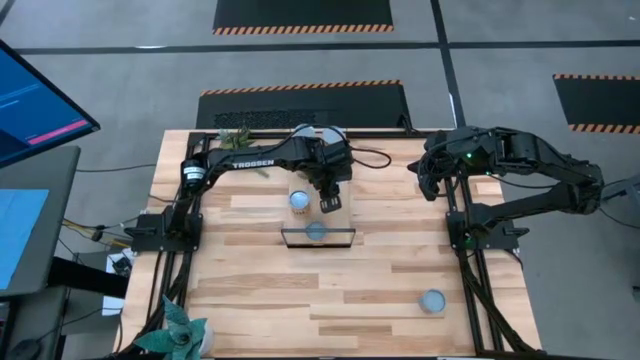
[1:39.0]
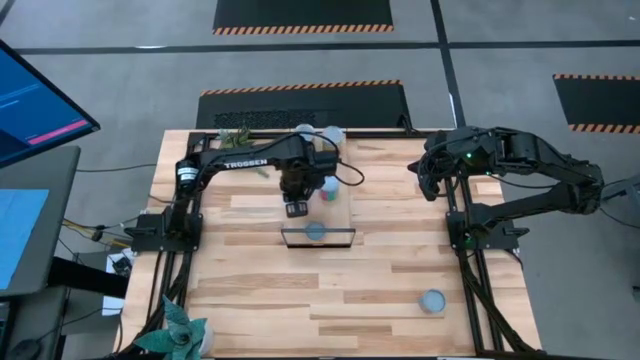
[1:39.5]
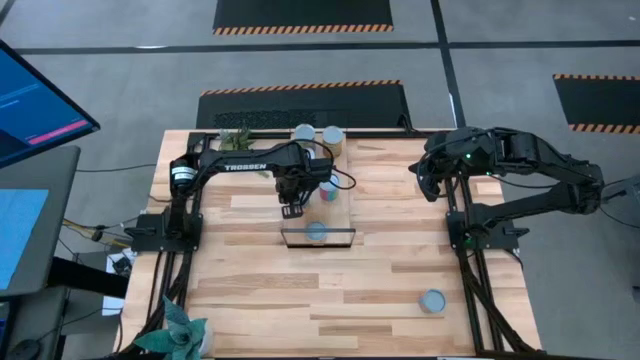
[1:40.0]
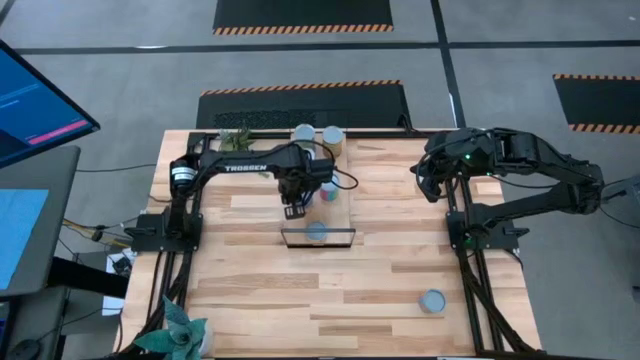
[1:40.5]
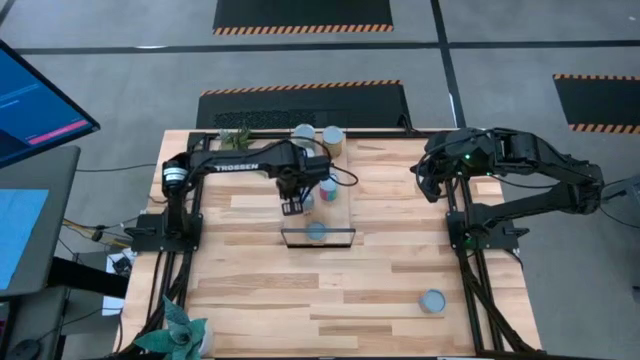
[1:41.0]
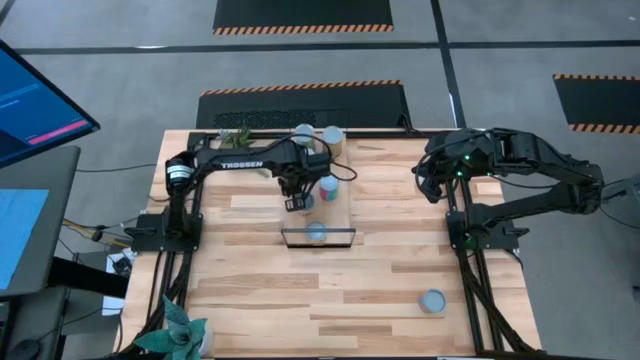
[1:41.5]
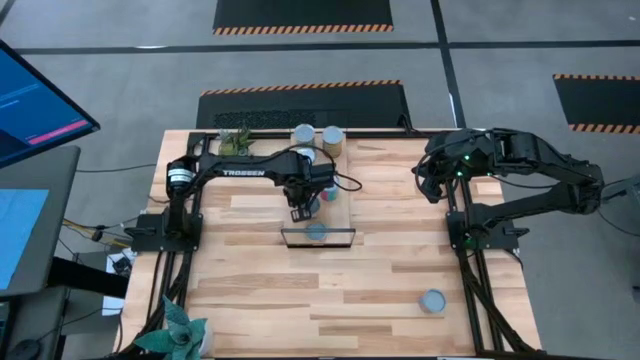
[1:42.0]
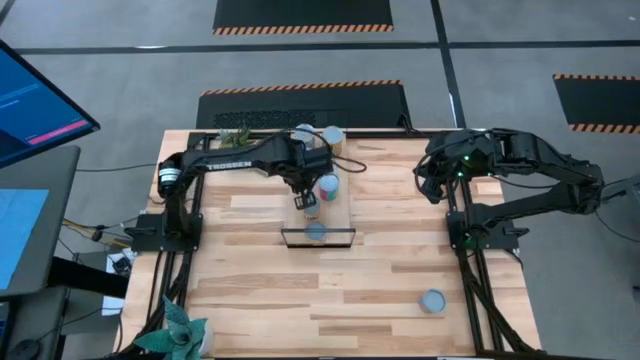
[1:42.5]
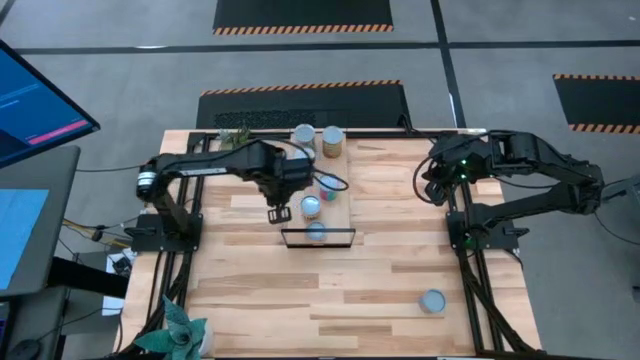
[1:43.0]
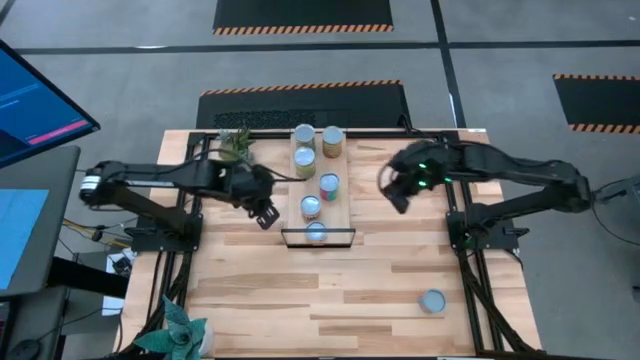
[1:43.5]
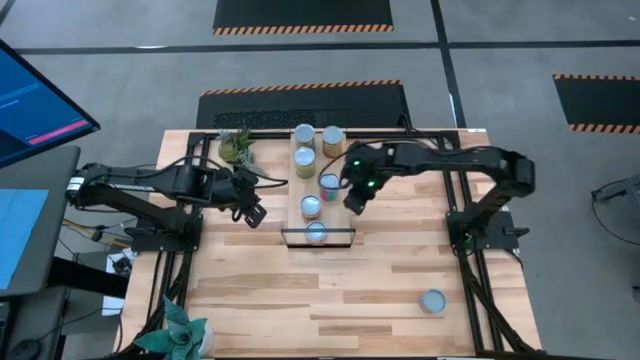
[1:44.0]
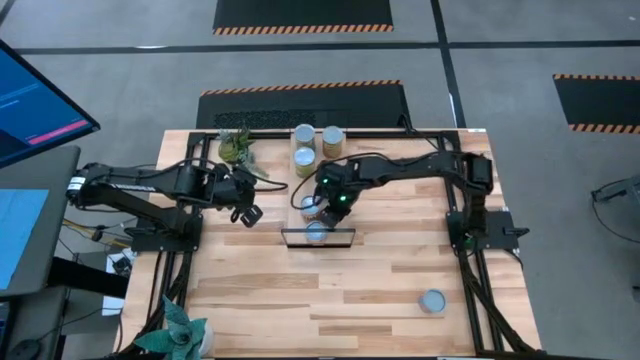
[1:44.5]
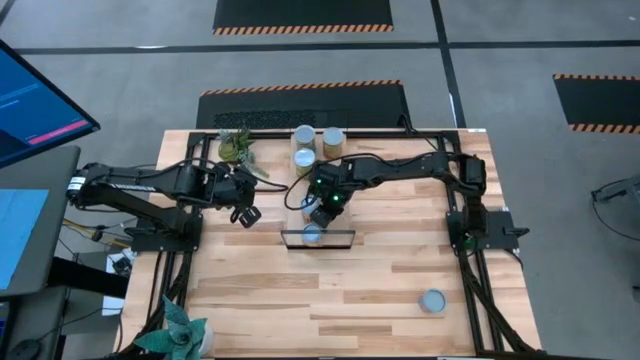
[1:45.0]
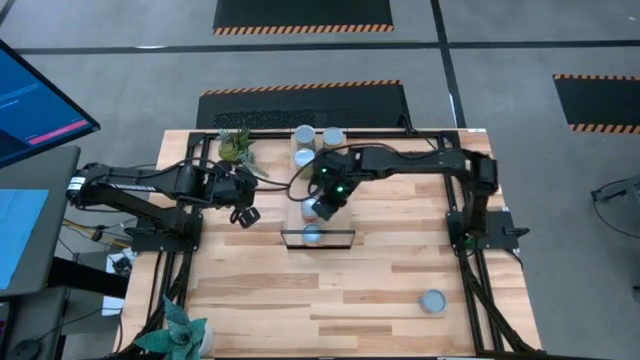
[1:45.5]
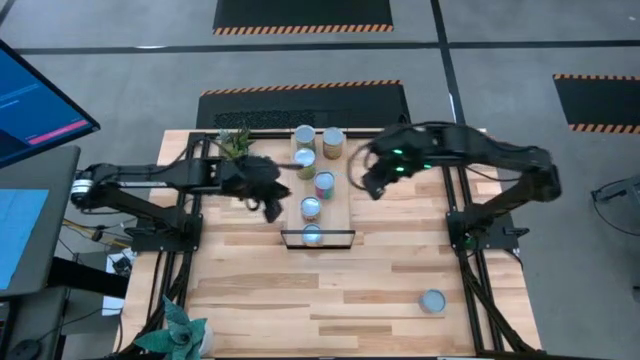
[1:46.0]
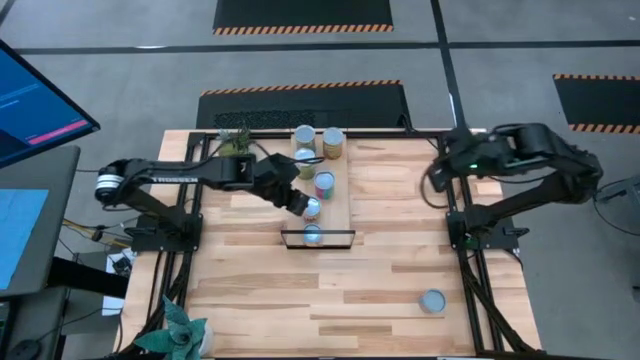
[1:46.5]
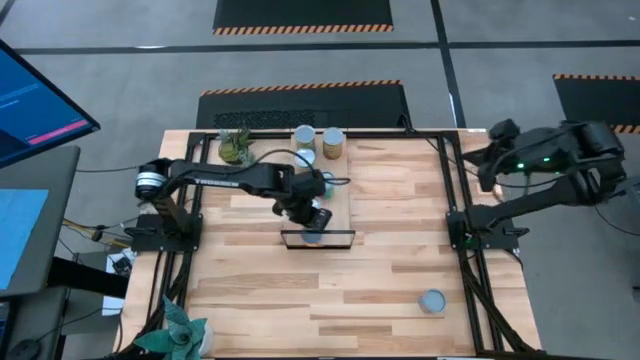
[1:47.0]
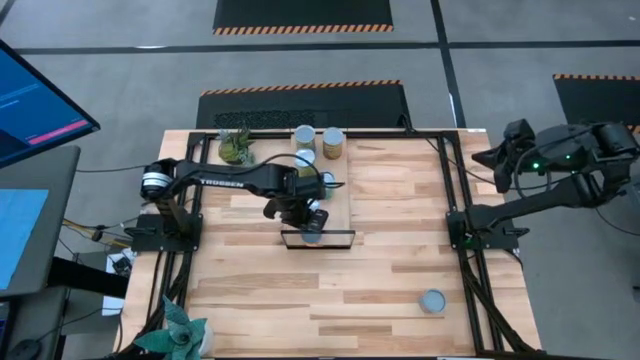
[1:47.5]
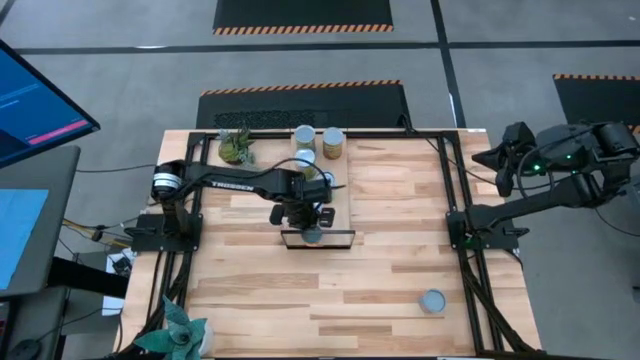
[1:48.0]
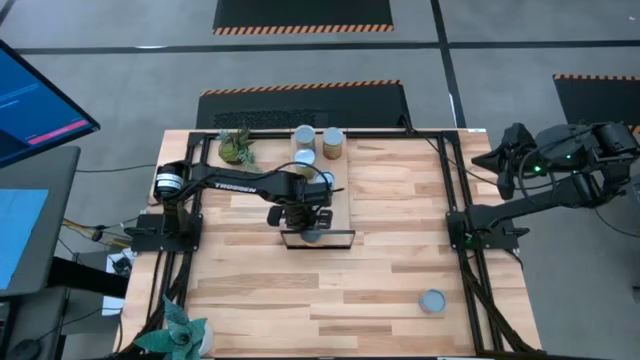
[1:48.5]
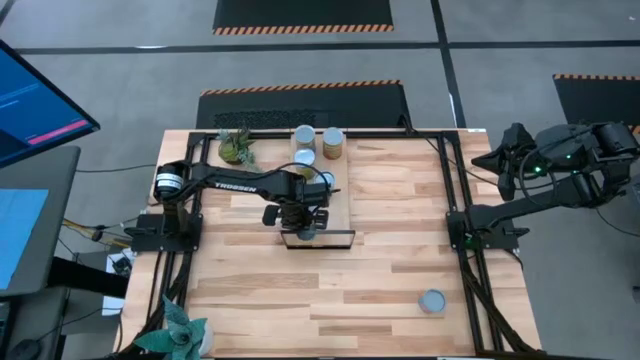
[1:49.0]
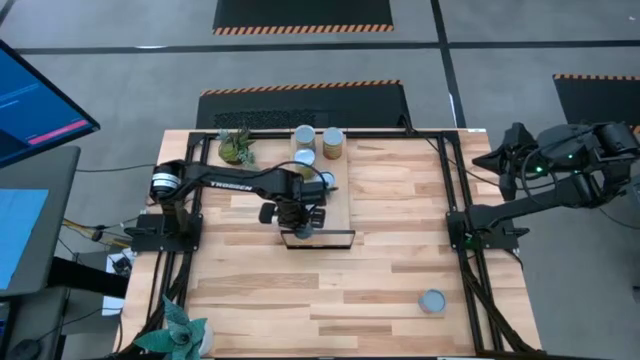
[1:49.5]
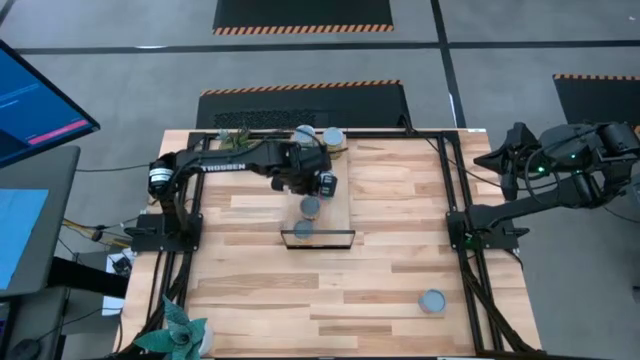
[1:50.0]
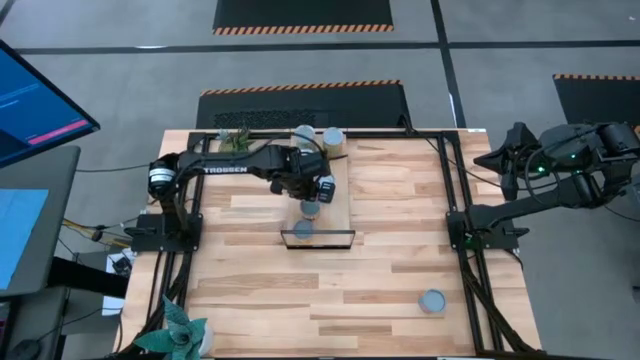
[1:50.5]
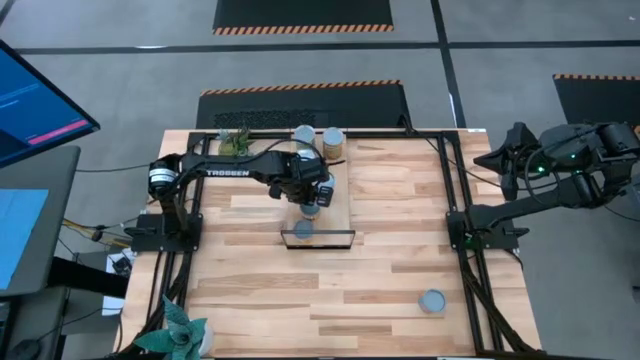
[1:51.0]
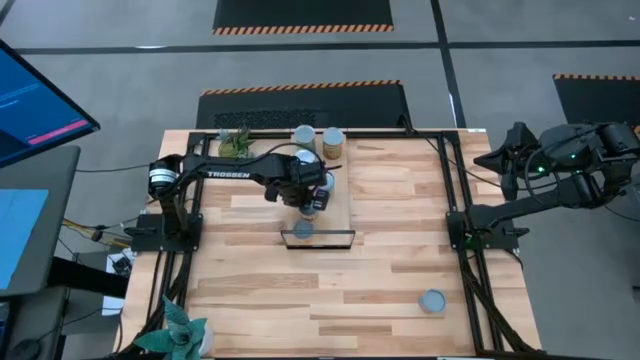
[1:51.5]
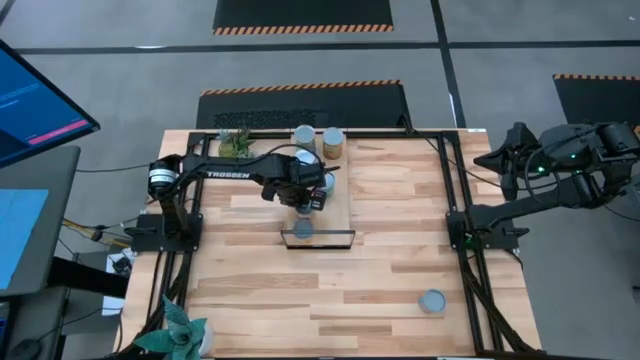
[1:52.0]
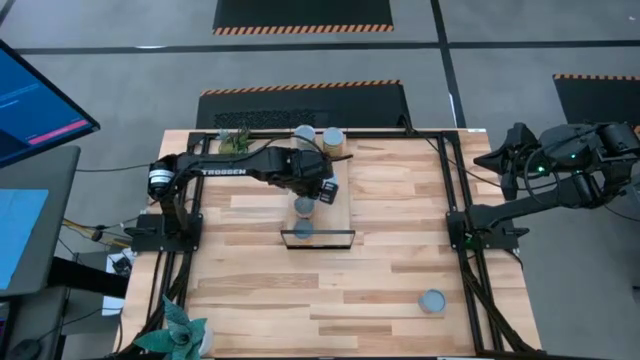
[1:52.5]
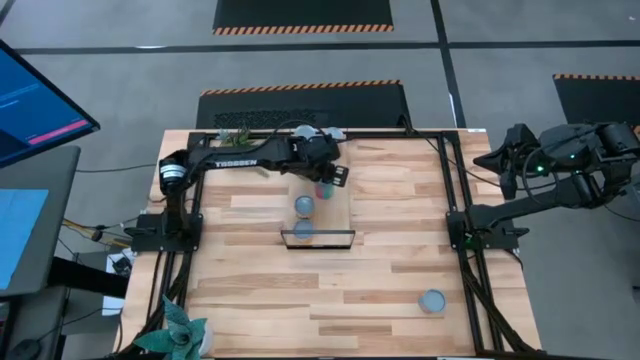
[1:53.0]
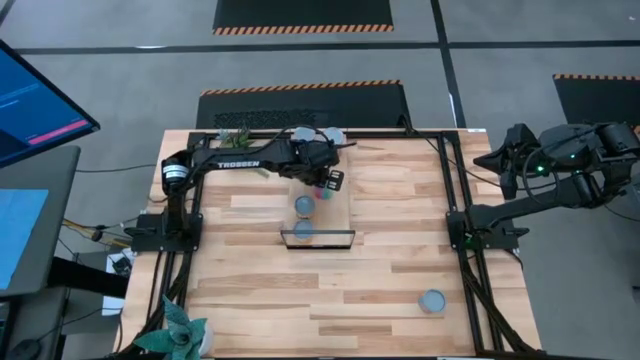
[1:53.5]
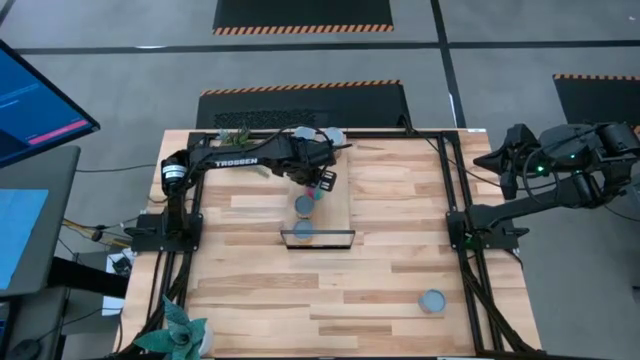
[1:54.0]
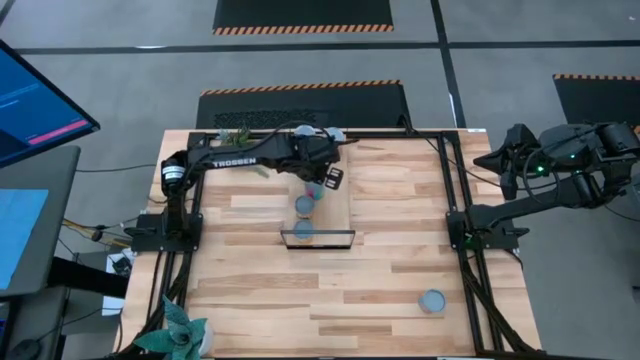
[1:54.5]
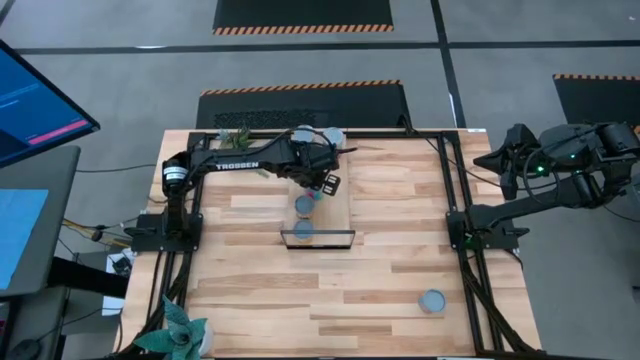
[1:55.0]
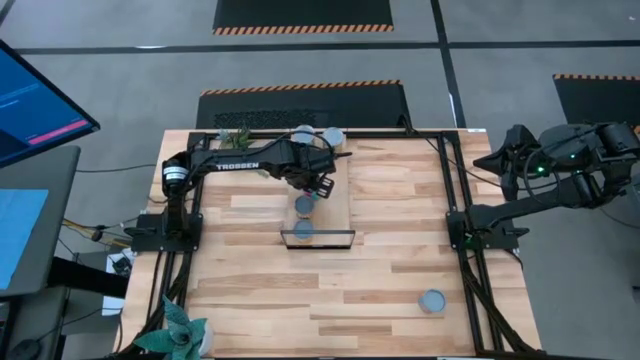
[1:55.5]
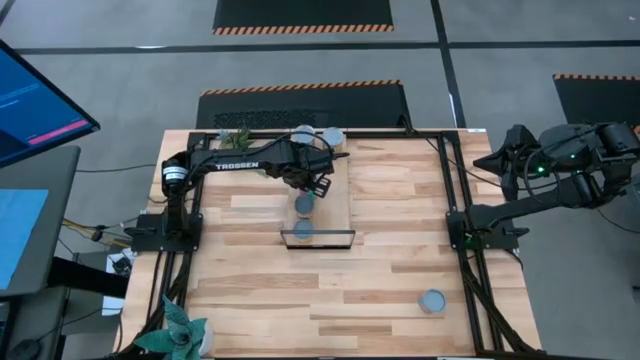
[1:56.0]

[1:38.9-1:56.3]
Task: Pick and place cans onto a shelf
Adjust the cans on the shelf

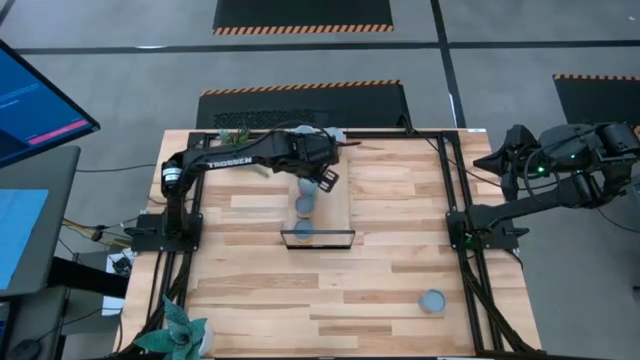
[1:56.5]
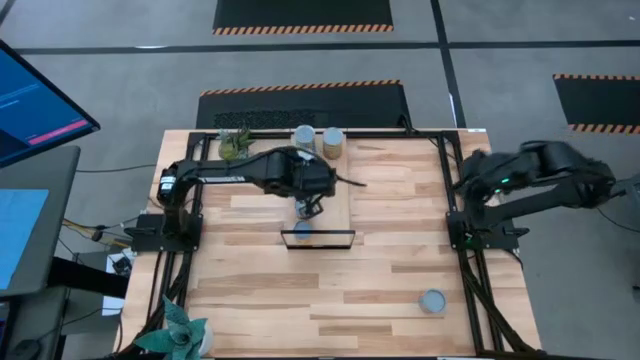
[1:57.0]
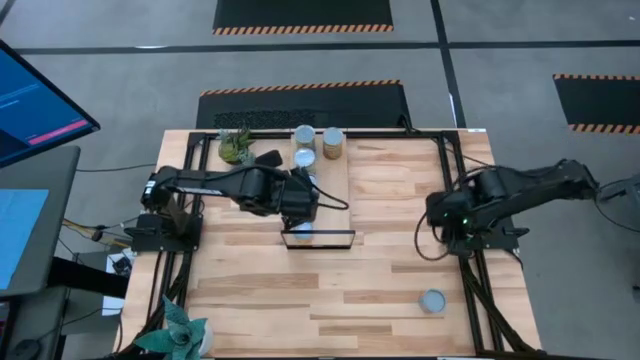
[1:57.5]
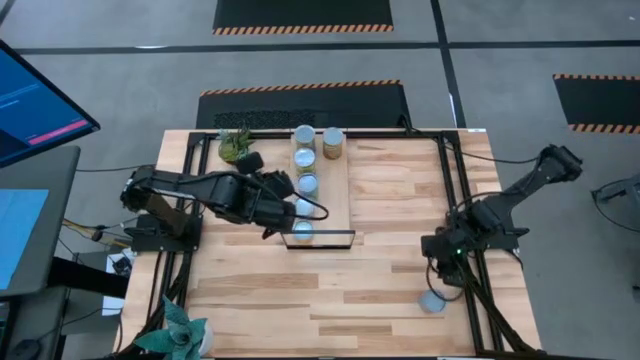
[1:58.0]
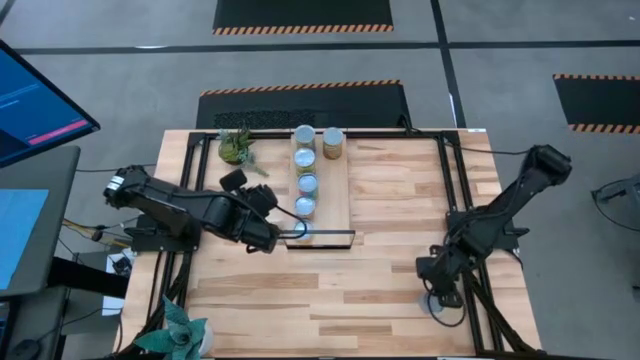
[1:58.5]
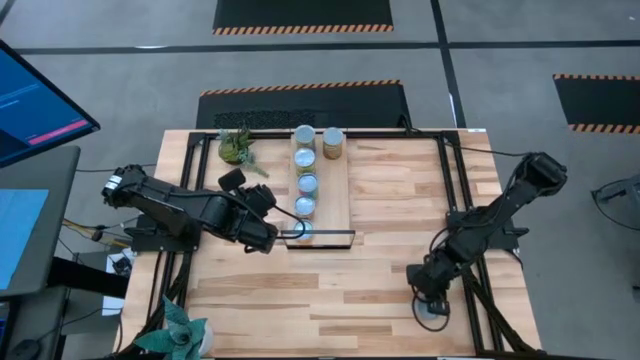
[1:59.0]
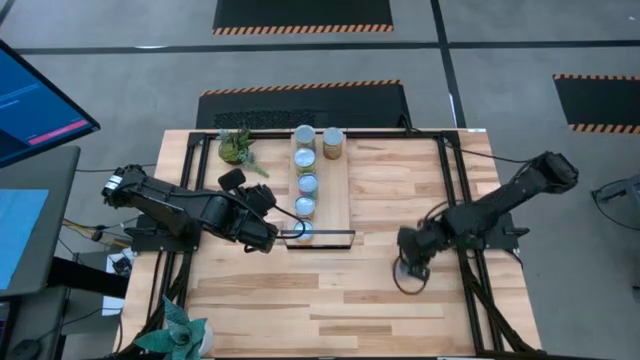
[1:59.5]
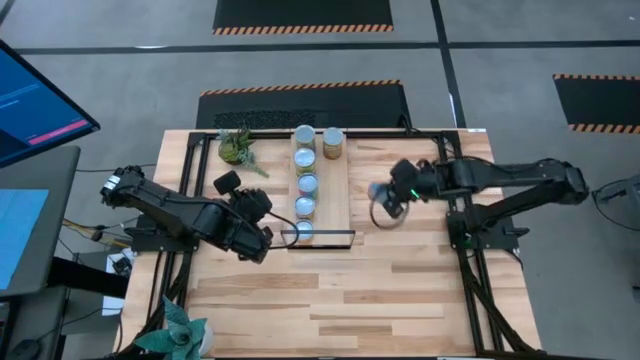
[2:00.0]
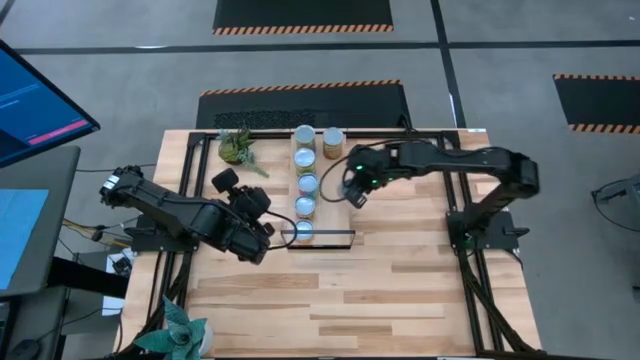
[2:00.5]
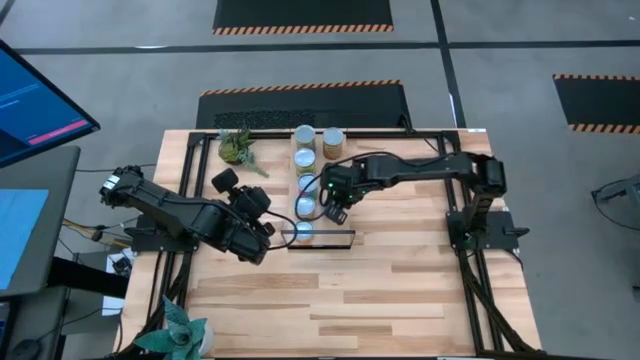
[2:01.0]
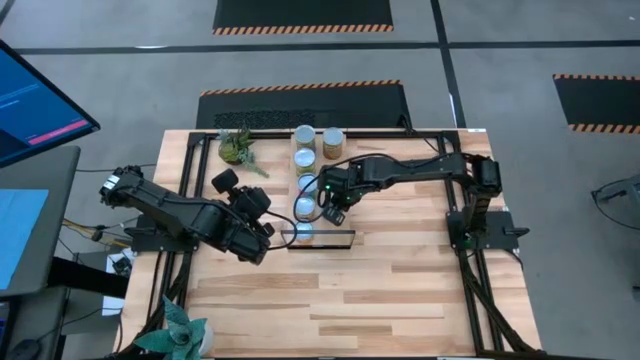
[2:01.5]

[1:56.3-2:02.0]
Put the canned corn on the shelf
